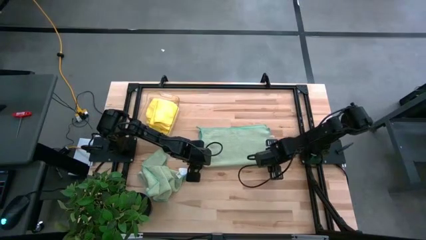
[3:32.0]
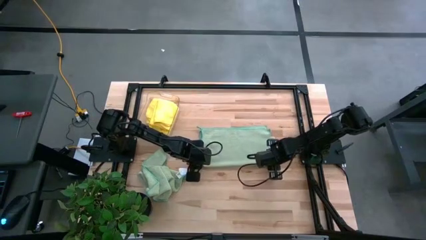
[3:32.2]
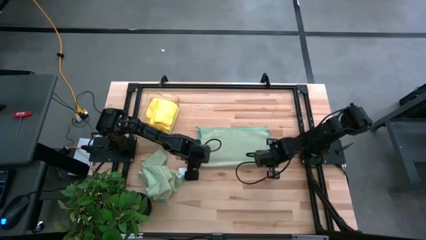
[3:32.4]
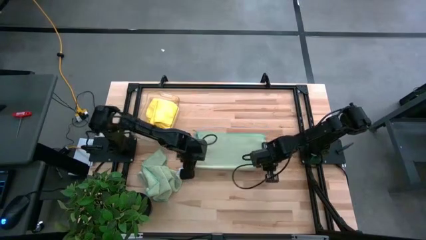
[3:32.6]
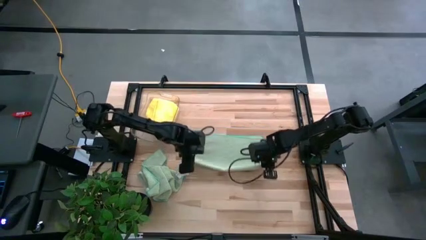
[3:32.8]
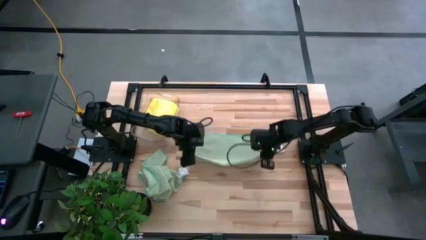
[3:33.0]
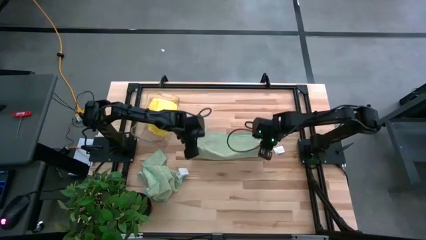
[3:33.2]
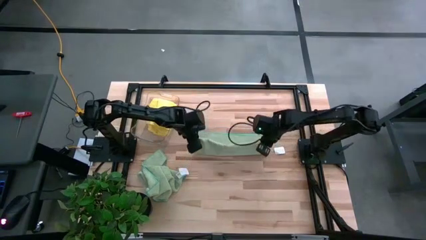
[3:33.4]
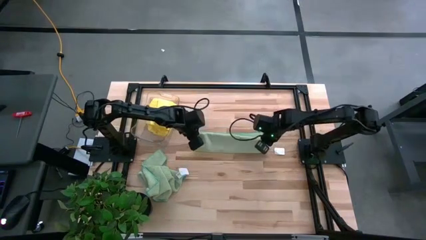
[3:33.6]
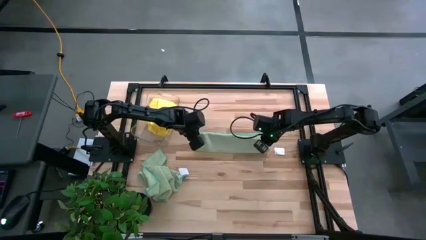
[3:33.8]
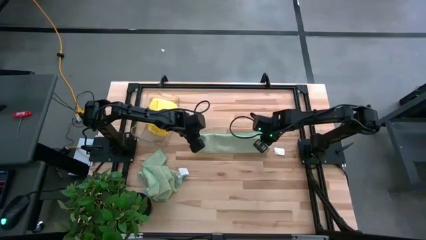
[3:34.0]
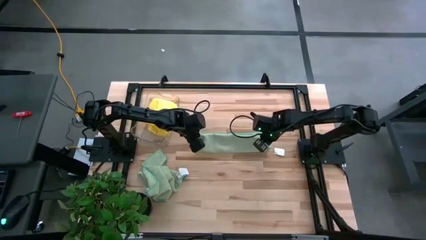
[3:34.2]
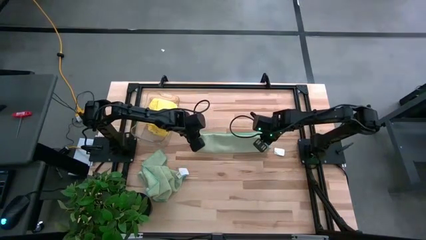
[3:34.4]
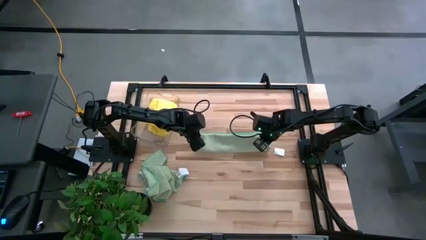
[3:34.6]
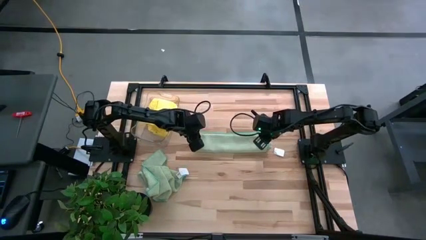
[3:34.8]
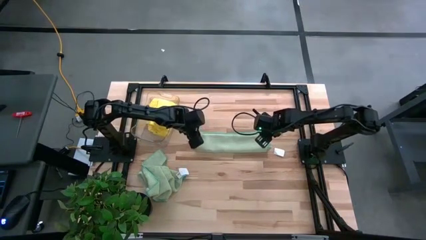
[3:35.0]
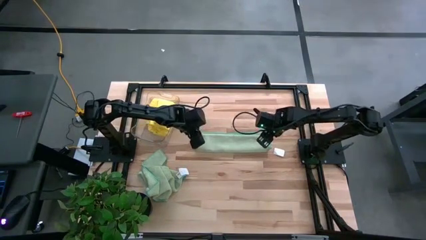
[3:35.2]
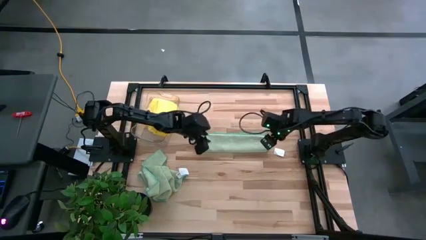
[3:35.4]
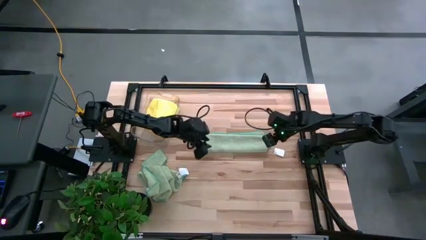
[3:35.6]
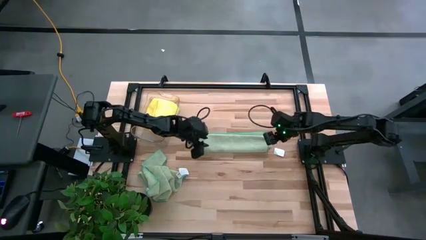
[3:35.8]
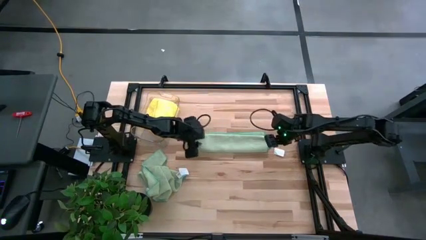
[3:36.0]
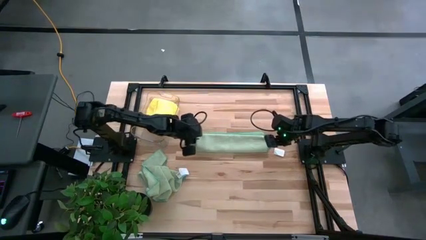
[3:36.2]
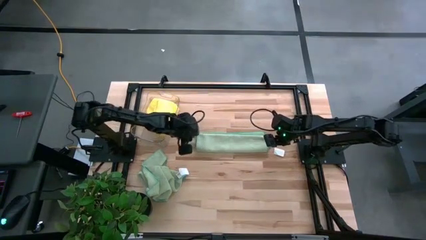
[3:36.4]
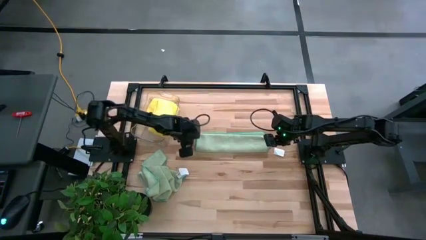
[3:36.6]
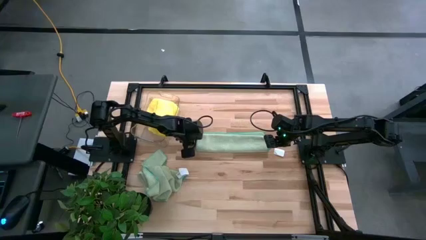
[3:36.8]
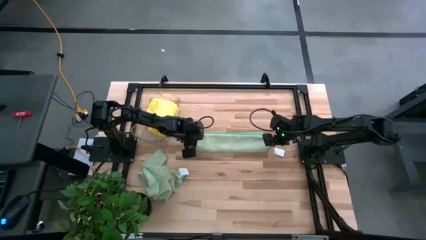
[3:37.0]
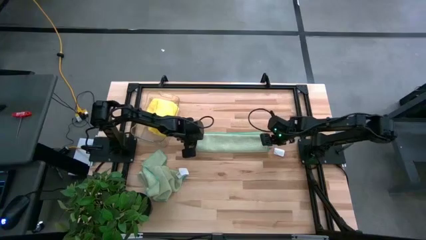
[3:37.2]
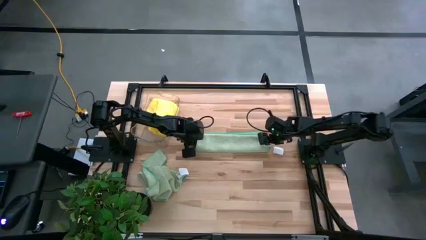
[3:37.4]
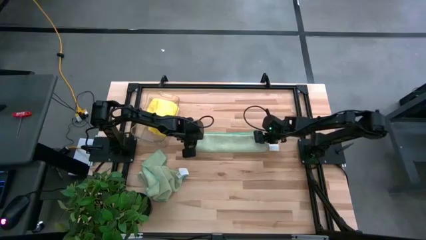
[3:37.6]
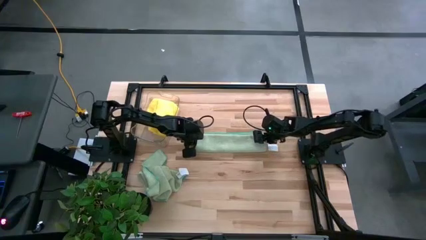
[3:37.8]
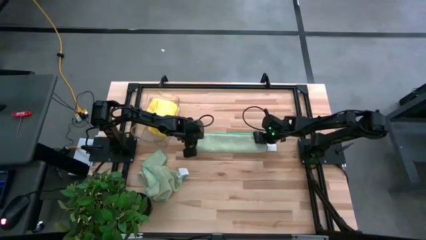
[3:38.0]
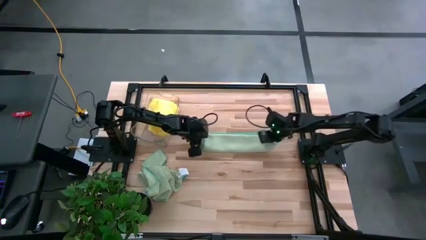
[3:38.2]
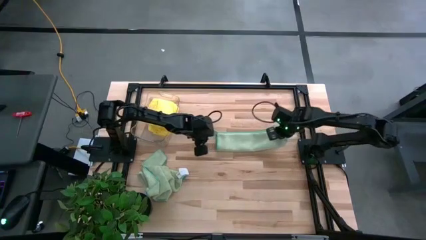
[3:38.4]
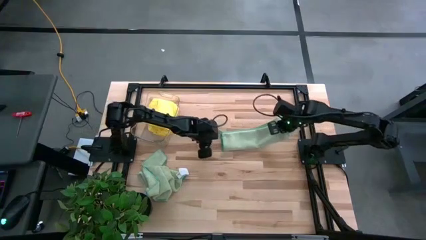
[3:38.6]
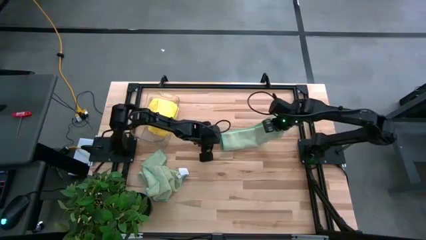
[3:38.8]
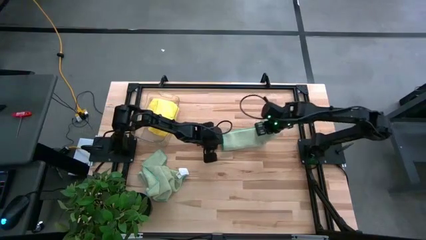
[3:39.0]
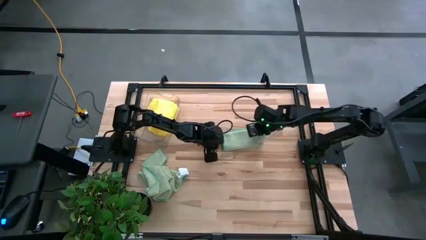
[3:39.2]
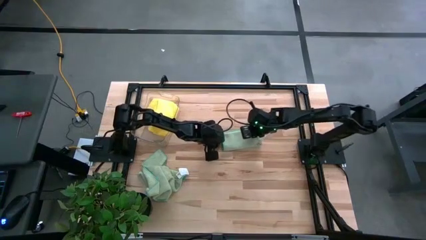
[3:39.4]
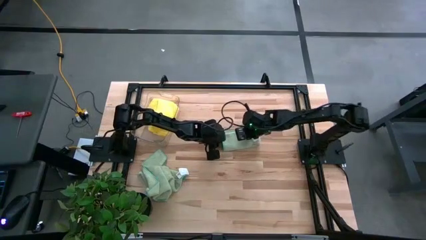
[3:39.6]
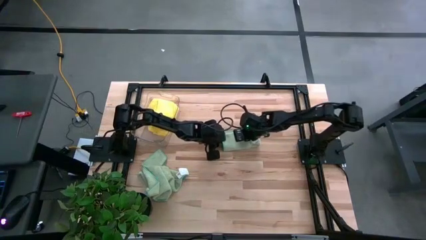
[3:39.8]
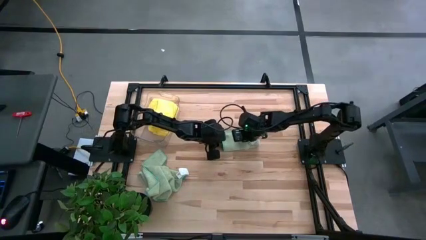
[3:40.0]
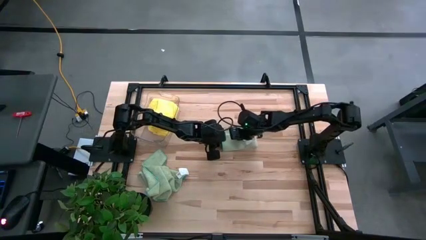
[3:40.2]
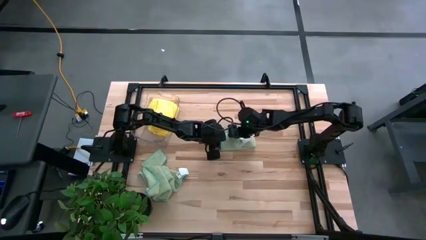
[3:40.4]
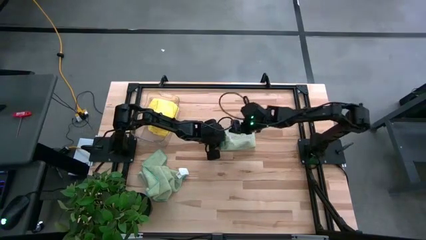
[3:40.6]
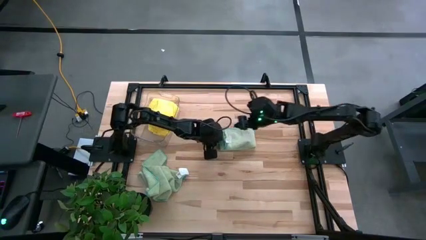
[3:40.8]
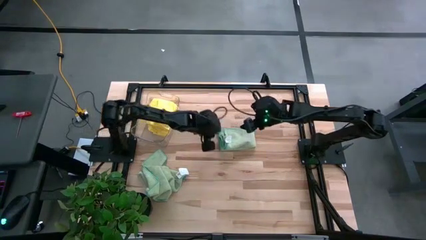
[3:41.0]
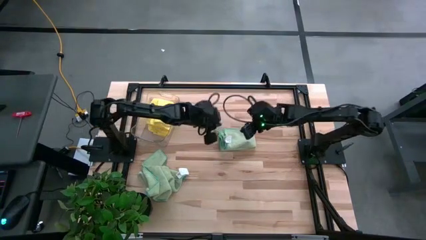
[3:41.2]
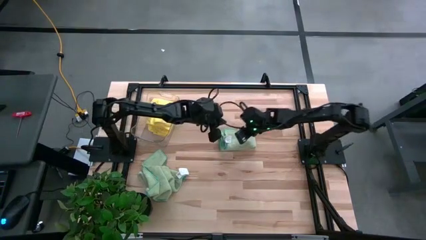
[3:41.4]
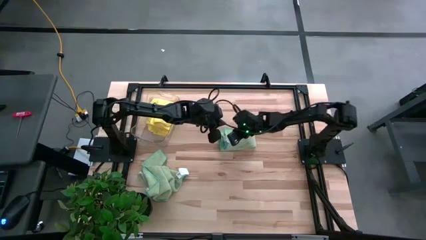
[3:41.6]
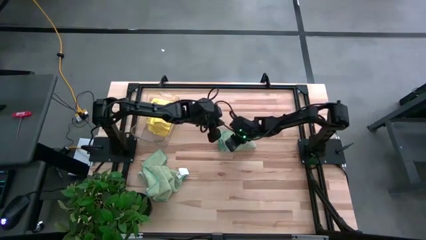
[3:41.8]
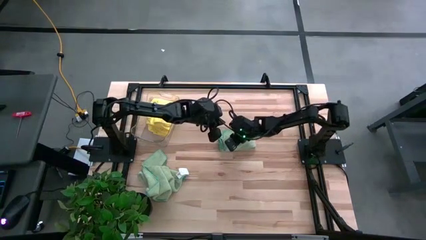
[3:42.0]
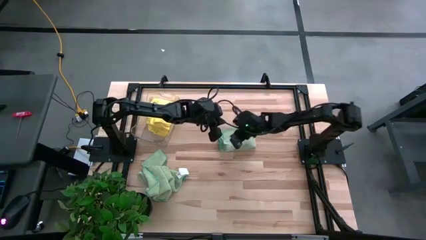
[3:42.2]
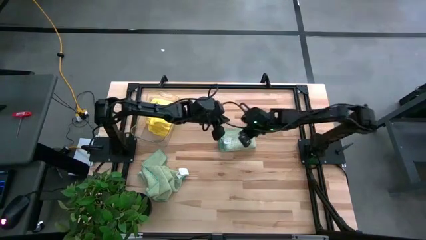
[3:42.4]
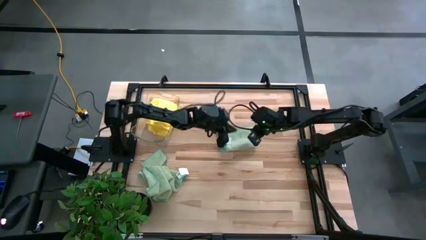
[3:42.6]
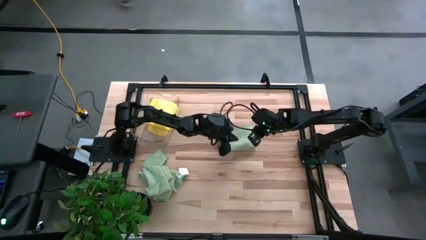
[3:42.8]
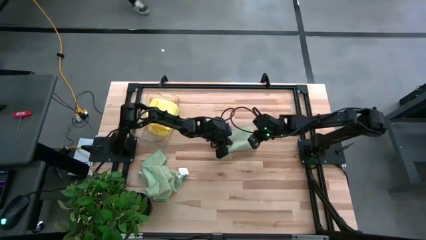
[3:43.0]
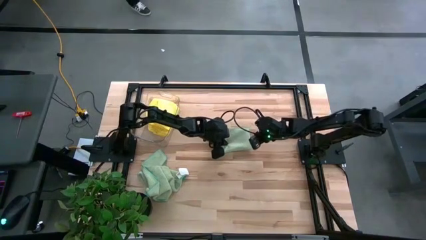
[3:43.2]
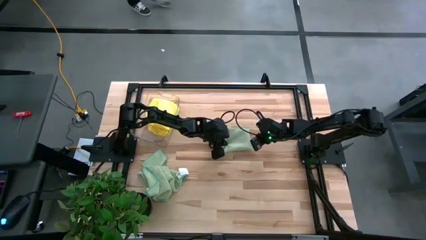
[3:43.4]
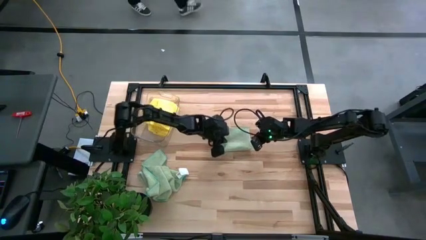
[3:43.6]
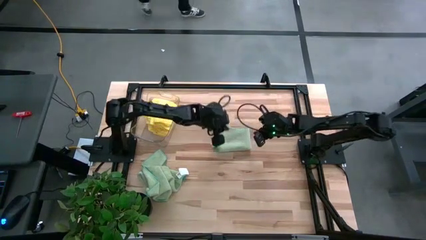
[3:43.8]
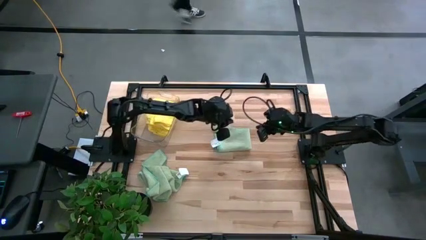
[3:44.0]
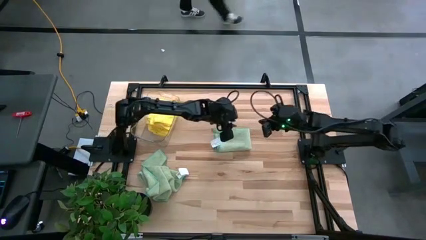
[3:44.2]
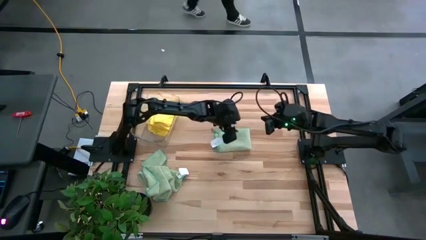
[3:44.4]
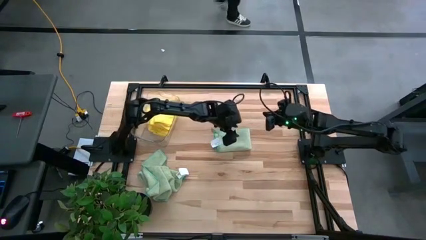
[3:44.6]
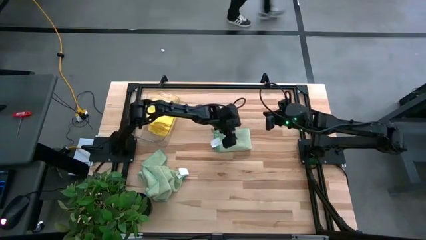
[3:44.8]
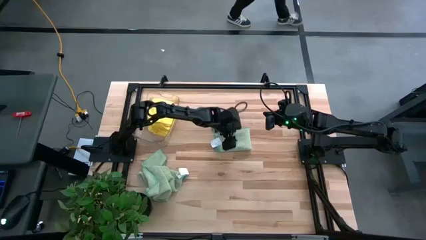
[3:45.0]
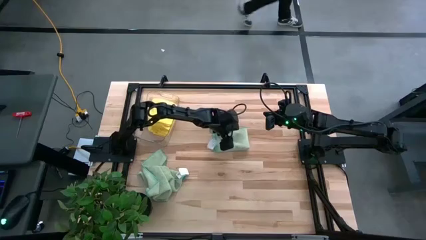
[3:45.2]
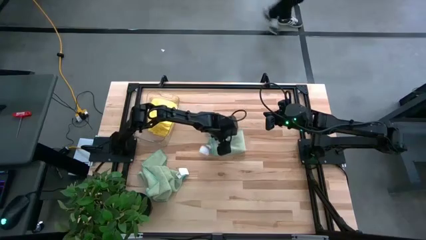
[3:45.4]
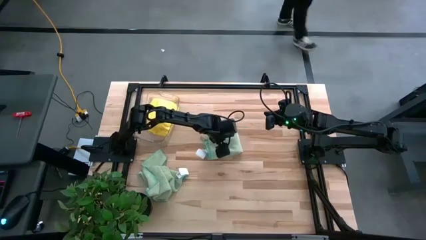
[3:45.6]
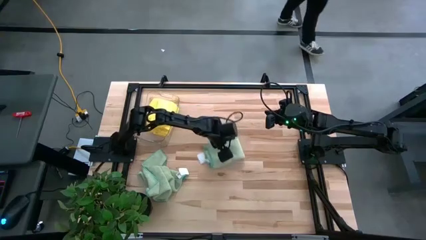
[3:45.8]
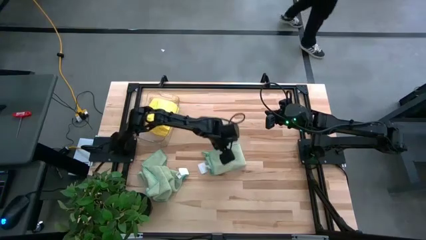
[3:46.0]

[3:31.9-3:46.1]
Task: Fold microfiber towels
Fold the right green towel
